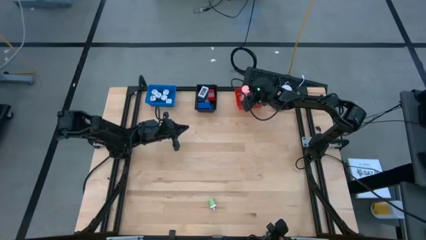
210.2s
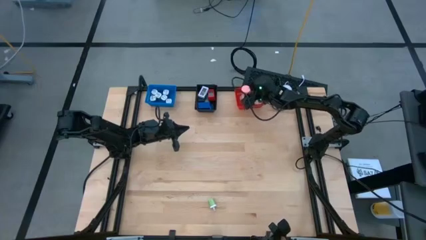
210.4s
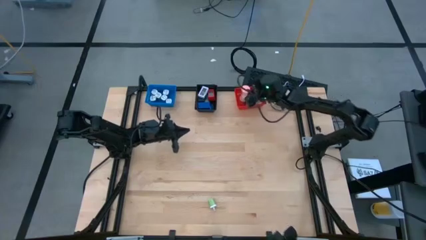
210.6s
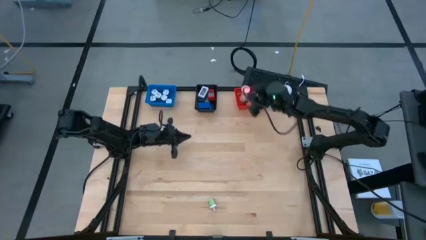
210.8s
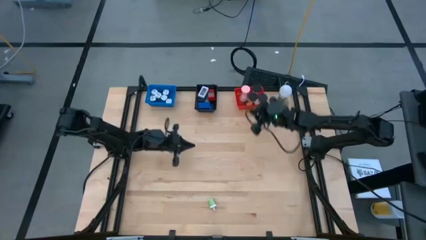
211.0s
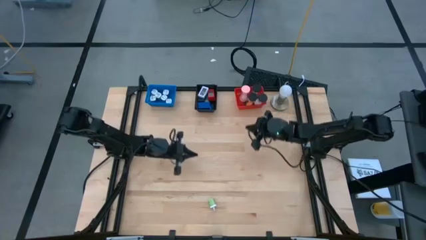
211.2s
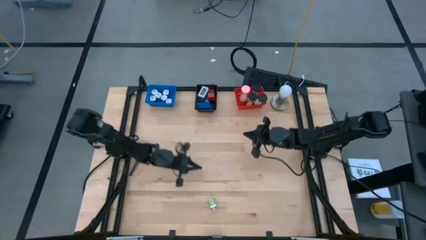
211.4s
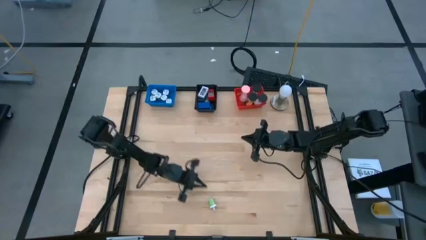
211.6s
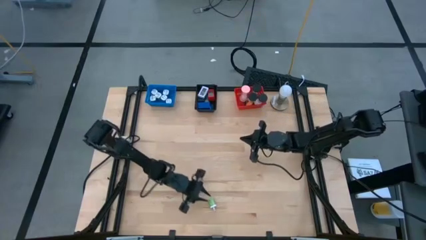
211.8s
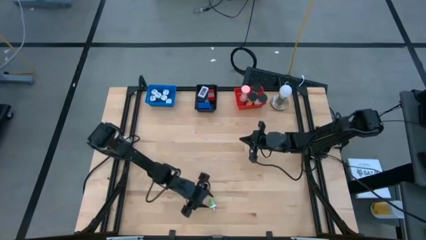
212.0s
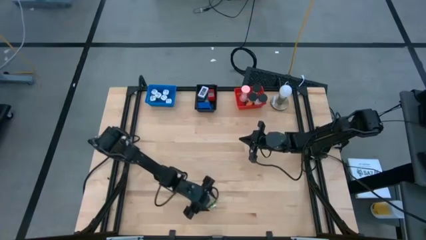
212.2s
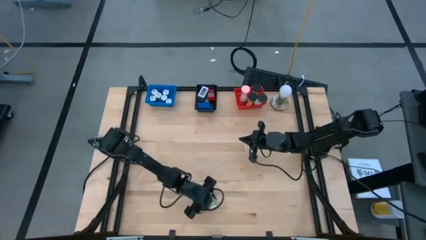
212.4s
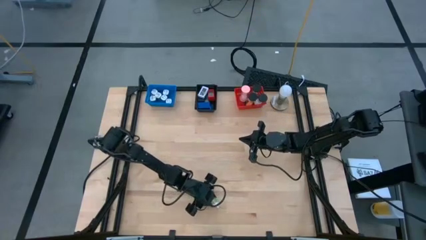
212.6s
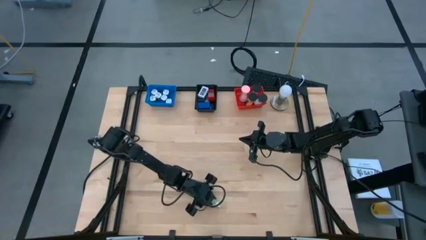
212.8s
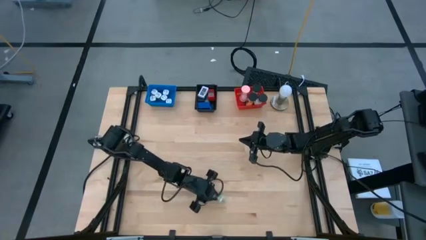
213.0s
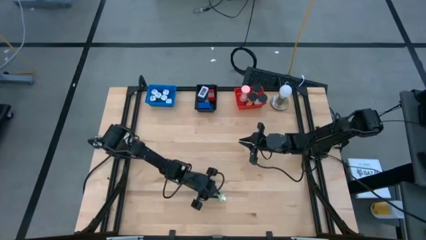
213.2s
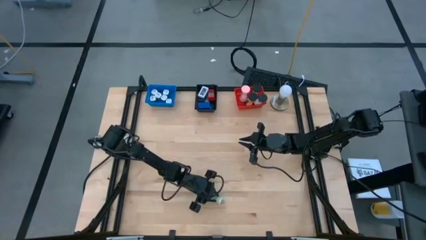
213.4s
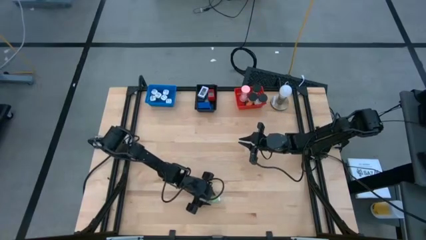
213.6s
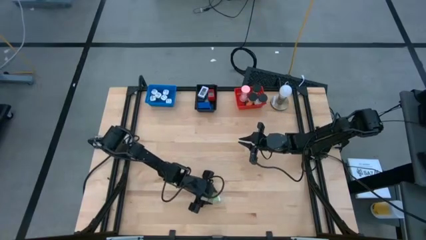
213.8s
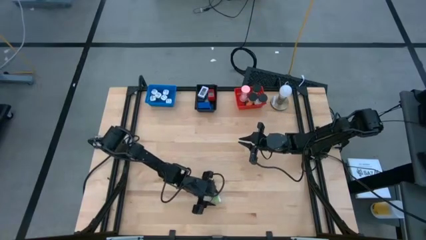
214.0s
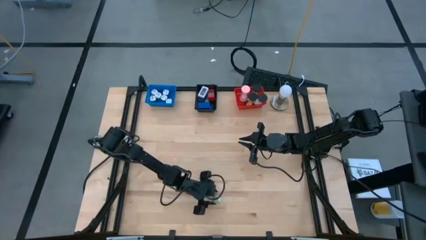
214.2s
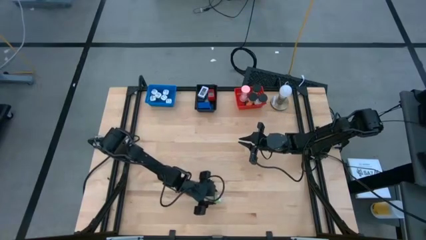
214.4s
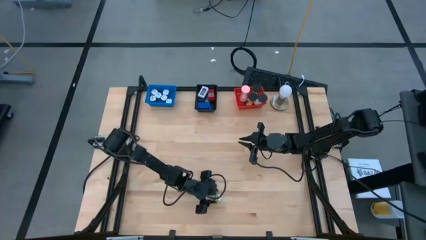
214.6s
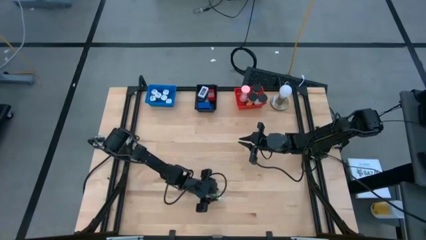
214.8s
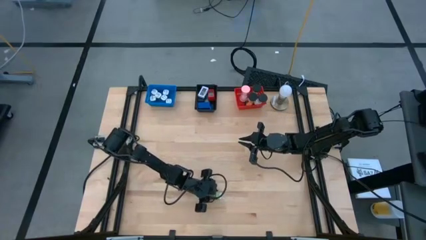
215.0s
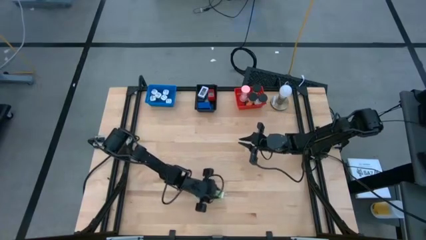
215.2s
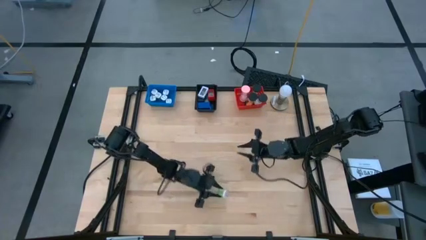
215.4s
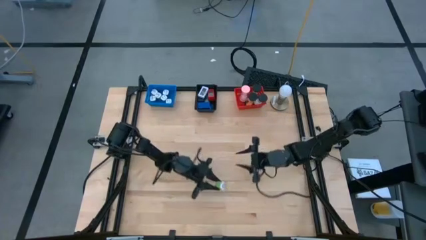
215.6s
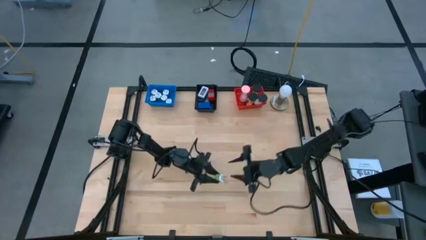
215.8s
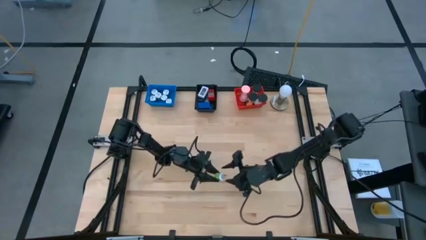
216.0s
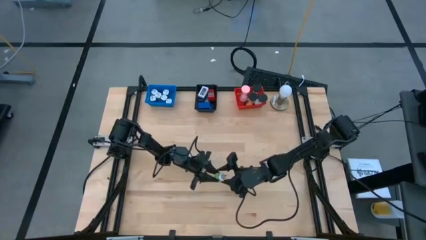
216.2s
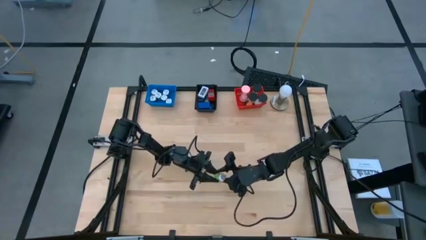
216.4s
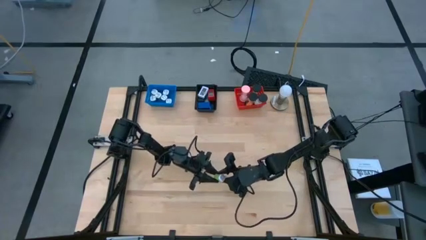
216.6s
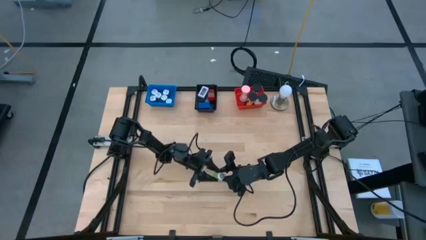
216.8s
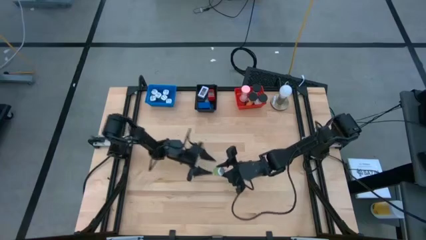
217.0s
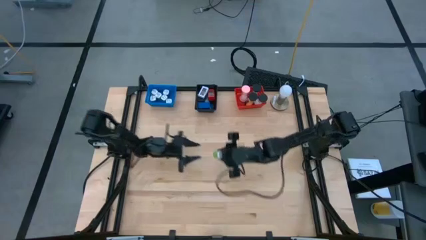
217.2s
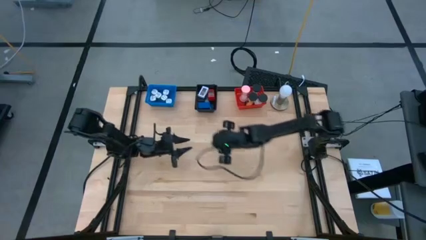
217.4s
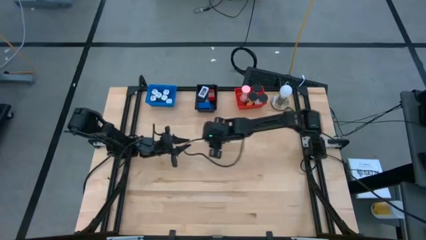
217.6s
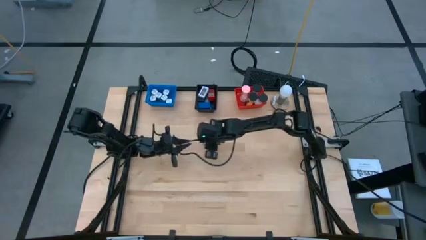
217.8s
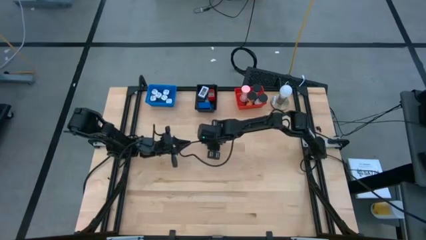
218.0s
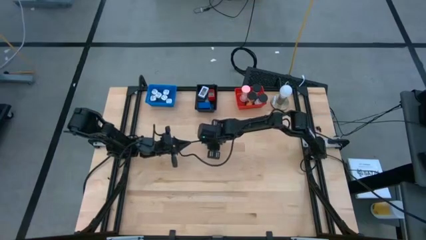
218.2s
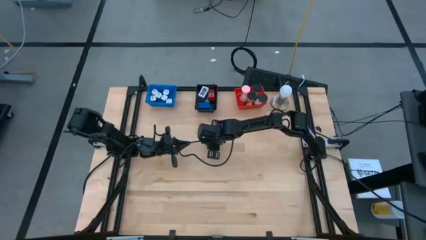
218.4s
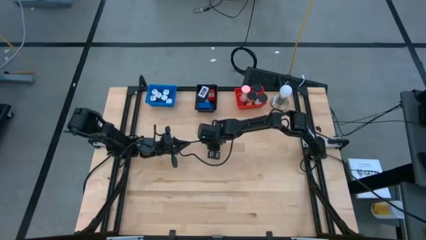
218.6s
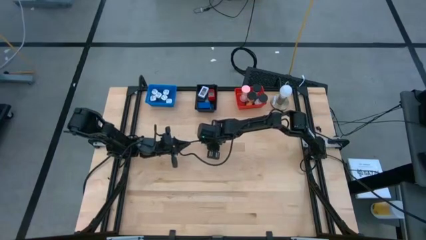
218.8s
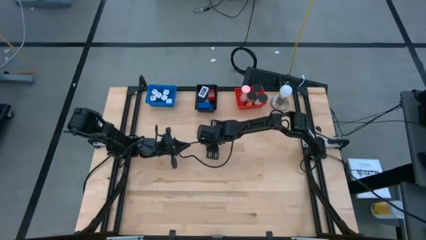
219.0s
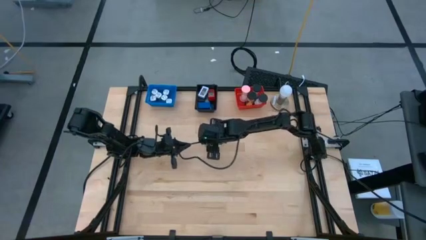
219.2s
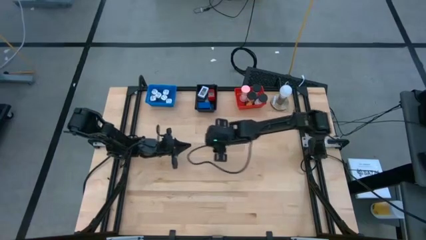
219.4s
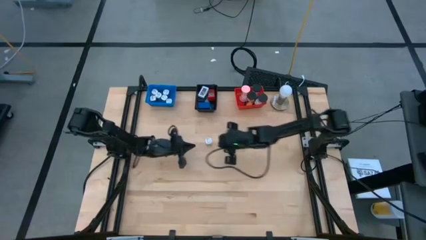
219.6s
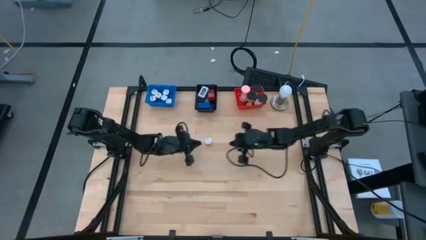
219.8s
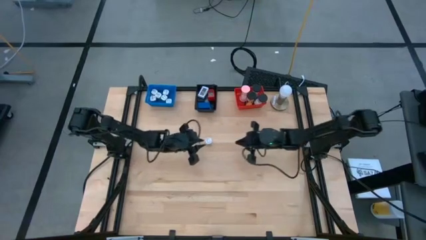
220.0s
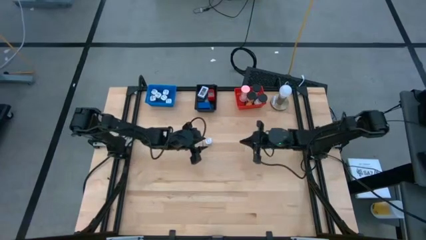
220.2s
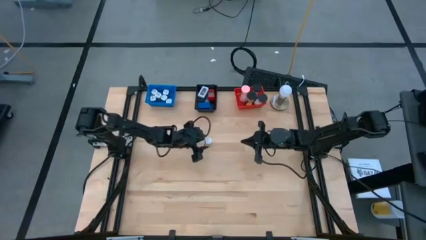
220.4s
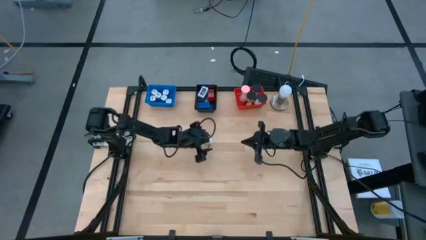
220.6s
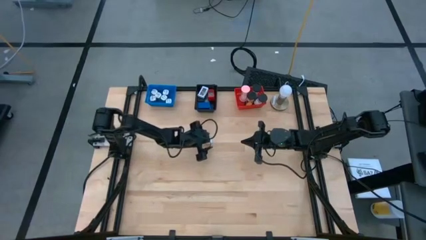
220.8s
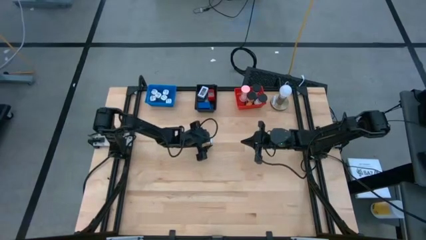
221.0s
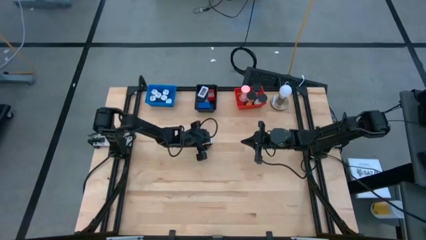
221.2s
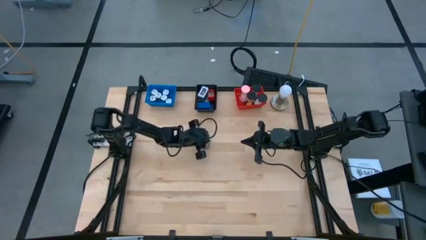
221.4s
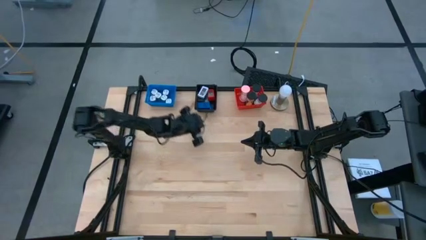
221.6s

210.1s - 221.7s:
Task: Pick & Place Office items
Put the green charger adapter into the blue bin

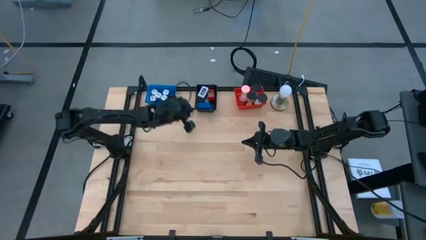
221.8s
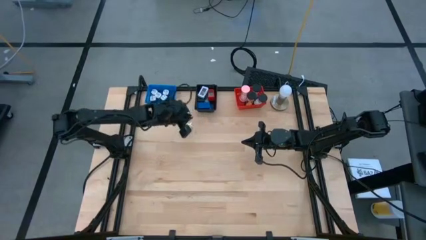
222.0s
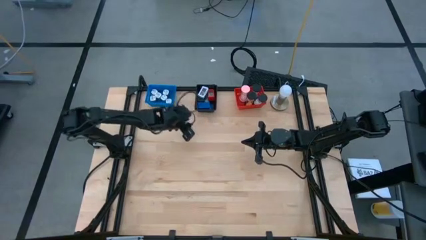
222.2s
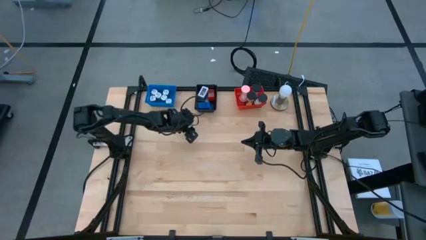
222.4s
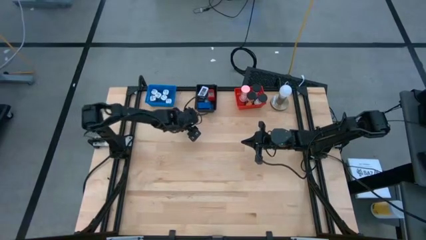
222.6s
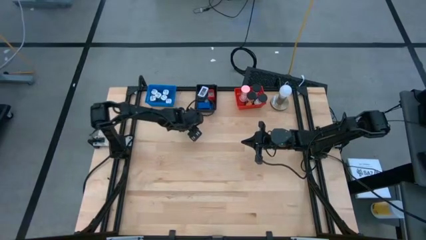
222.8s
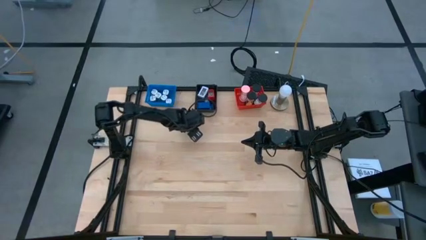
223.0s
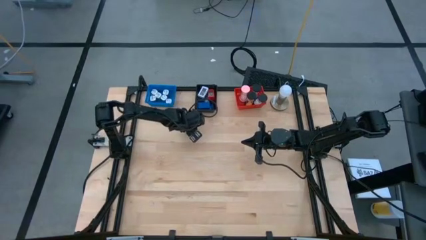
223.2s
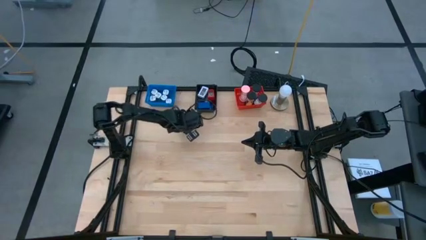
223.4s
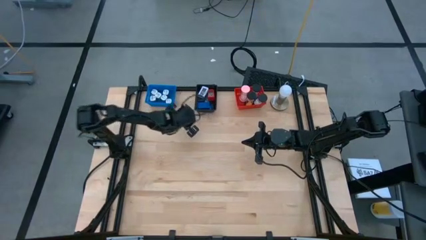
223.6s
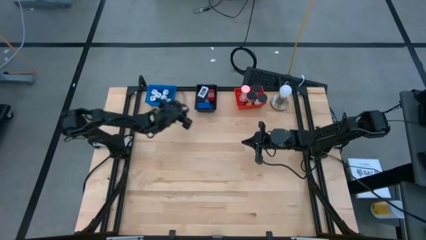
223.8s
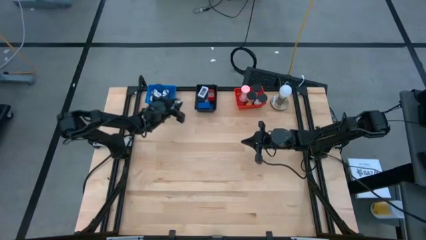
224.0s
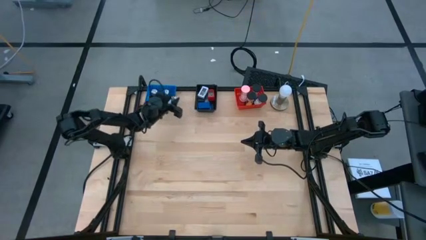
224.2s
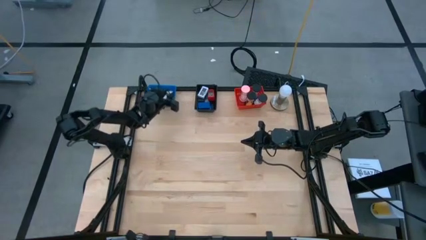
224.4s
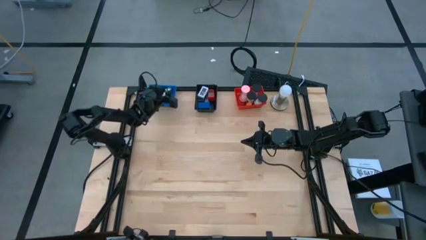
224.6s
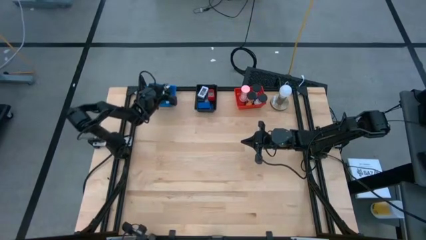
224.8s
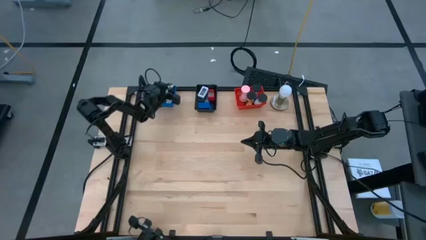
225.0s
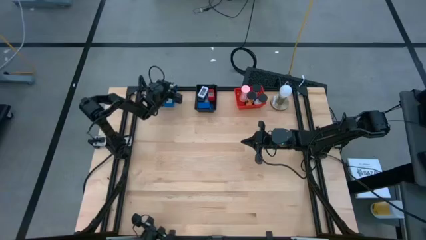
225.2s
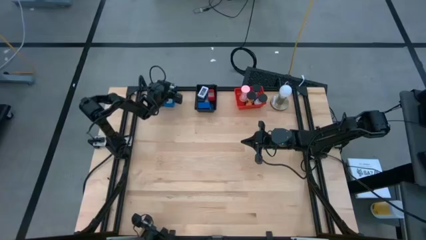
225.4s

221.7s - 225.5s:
Put the green charger adapter into the blue bin
